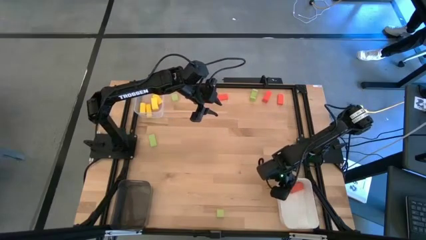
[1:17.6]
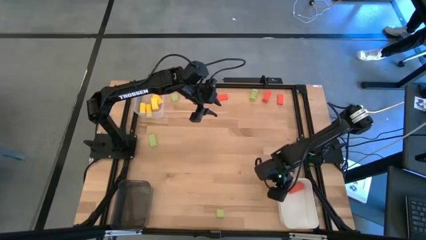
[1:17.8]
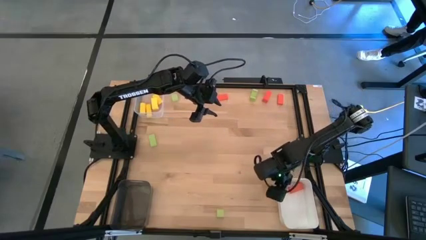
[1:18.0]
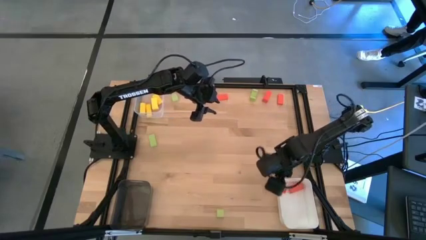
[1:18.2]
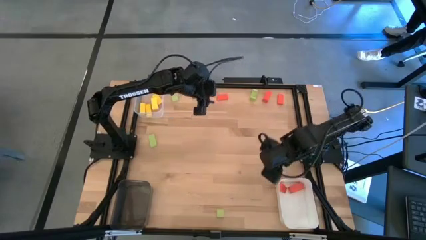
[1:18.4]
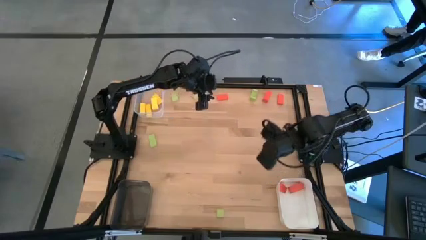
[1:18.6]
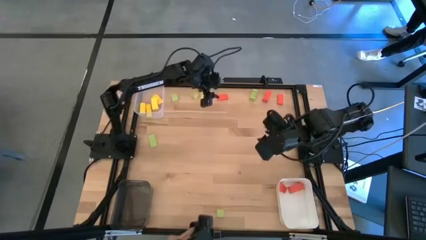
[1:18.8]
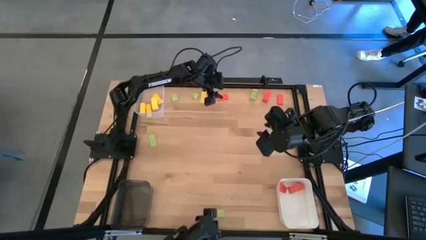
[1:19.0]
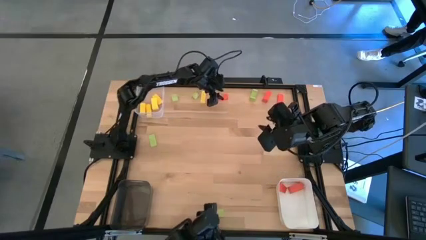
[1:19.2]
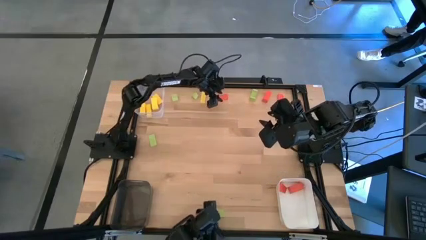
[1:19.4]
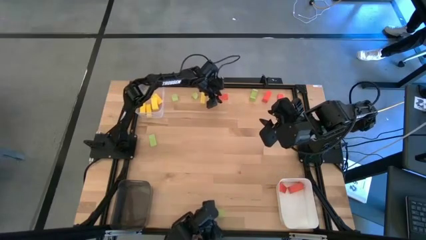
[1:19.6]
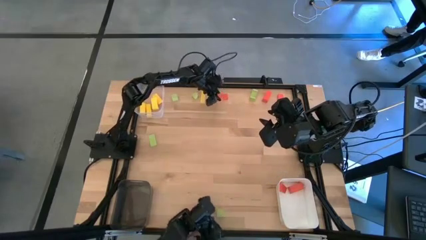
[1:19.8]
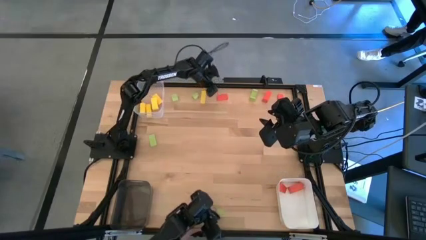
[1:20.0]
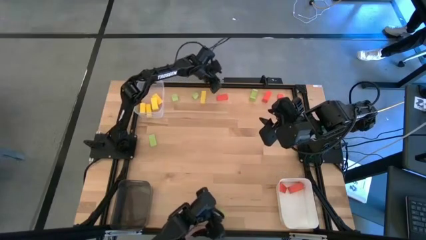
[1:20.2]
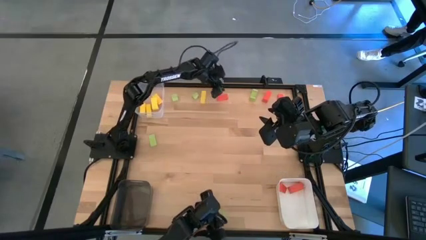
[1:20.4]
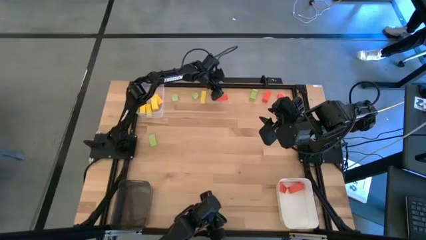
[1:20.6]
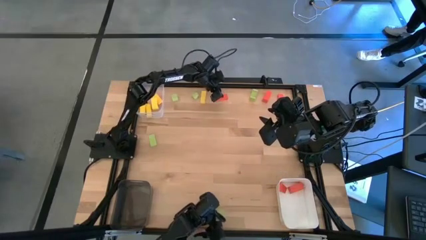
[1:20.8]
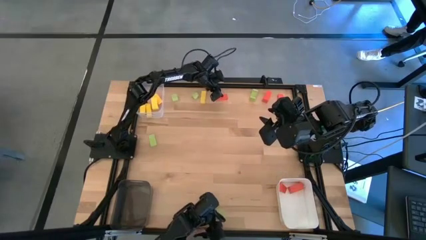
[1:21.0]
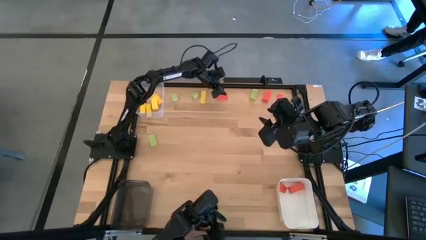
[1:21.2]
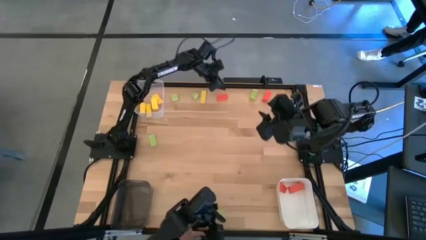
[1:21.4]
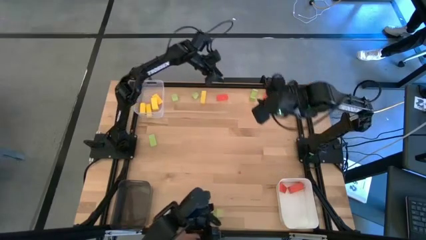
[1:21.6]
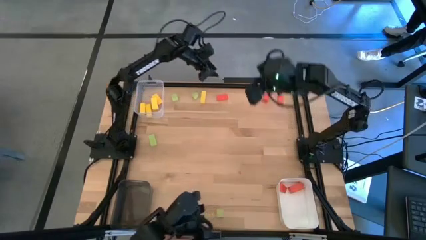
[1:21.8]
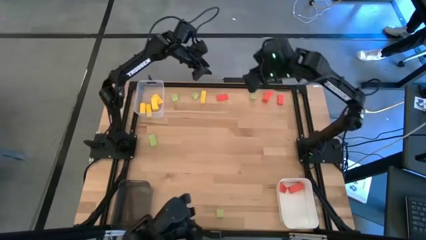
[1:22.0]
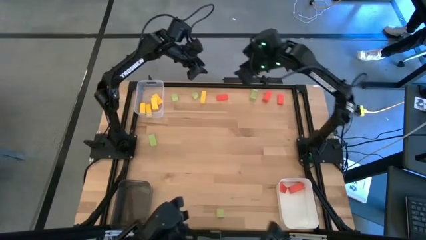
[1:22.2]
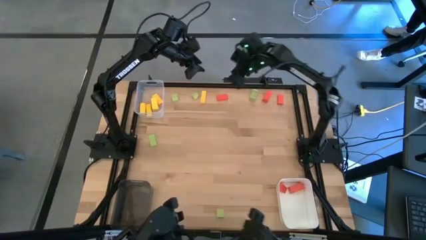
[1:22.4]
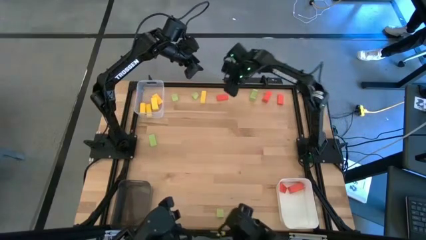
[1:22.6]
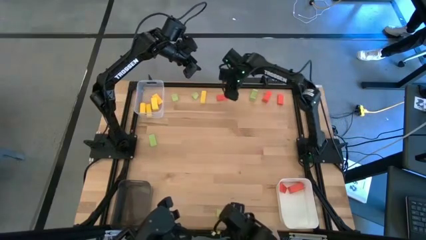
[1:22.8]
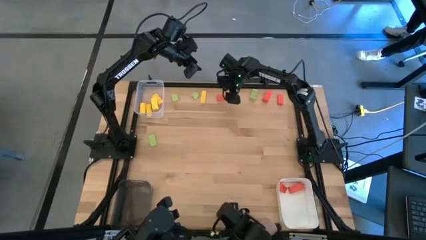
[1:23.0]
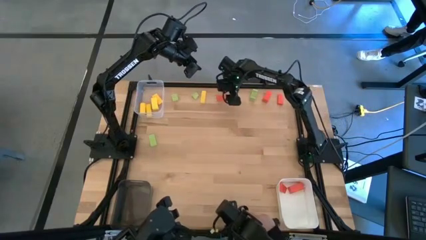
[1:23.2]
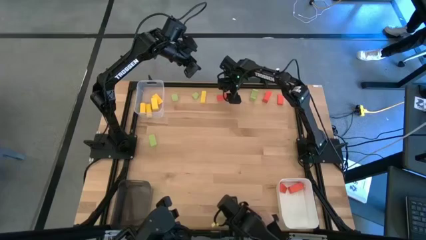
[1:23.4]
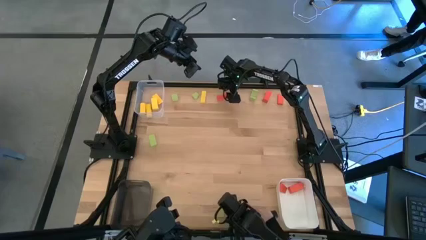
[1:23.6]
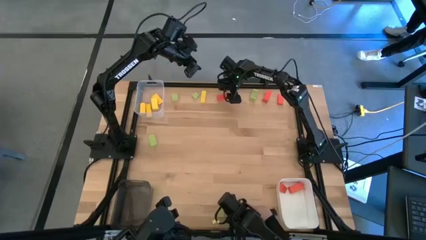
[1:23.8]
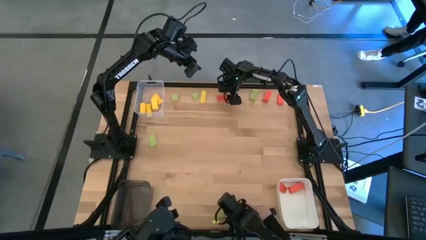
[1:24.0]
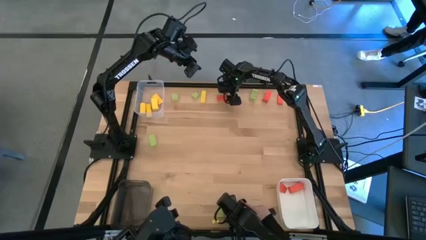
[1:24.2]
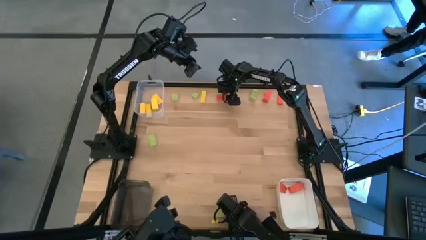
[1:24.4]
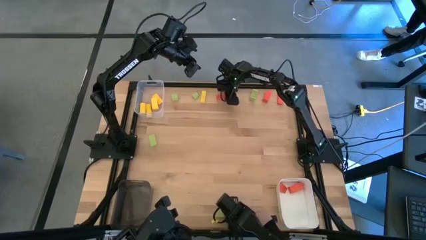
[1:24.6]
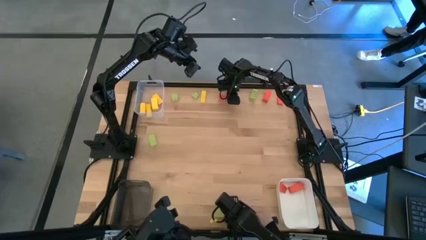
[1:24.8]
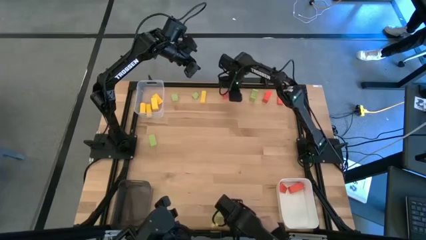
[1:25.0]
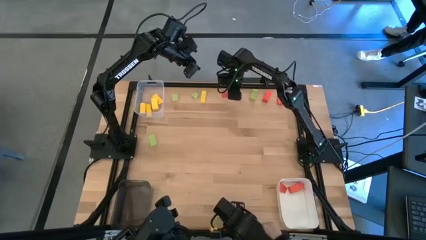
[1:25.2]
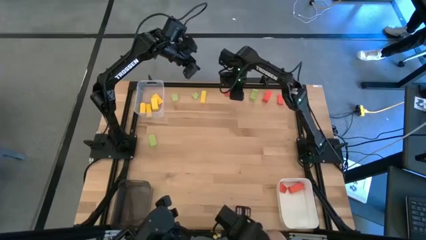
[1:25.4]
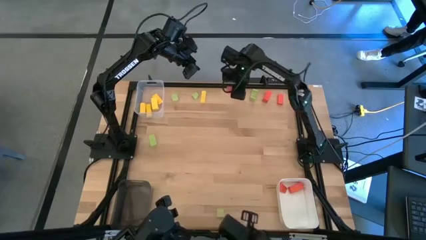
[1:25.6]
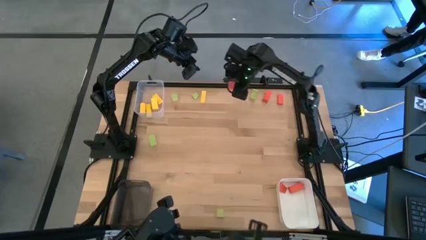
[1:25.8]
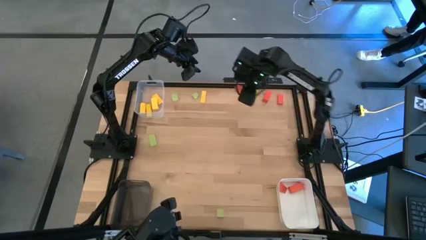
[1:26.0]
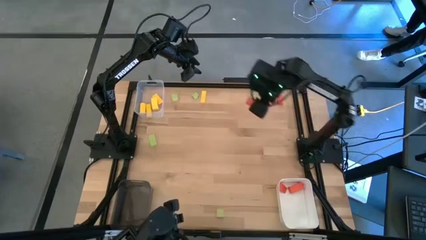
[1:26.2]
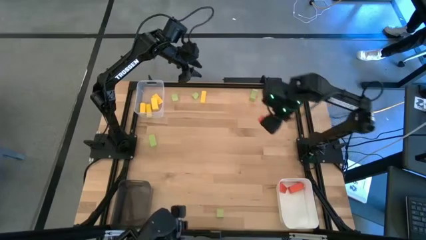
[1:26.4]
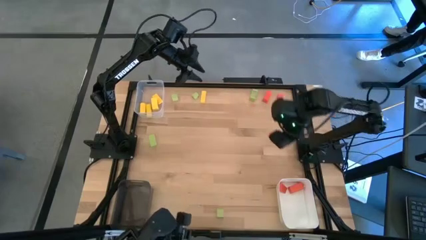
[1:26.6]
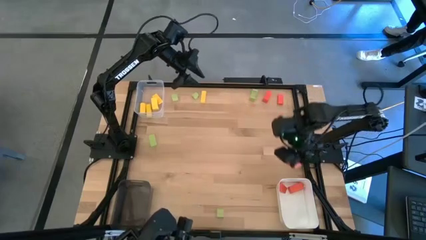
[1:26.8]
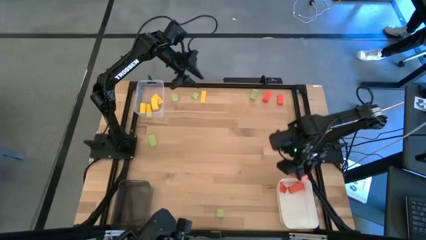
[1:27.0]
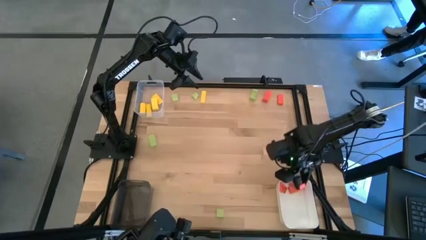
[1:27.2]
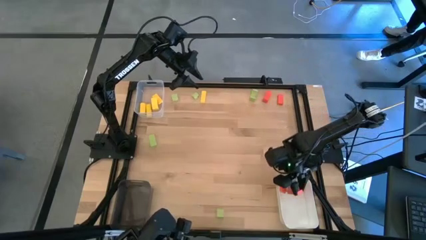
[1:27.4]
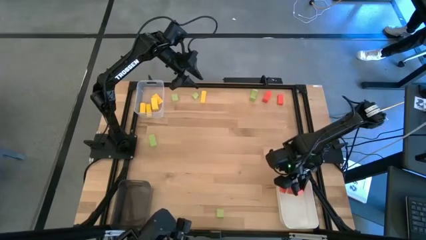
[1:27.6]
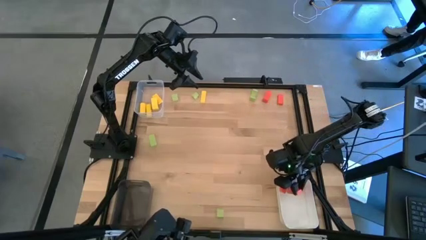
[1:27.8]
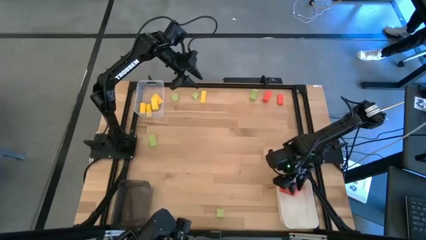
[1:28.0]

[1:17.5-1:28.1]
Task: Sort & place blocks by color
Put the orange block into the white bin

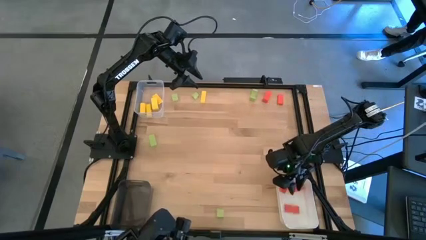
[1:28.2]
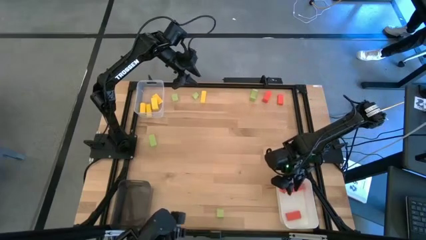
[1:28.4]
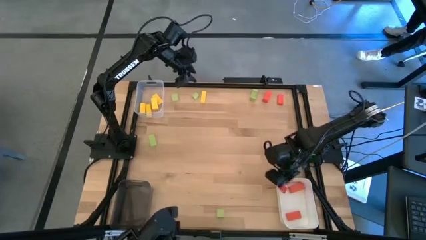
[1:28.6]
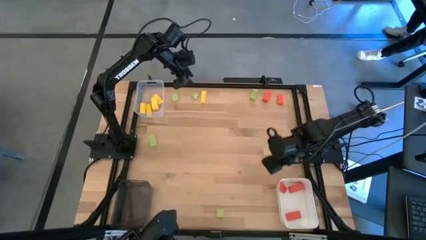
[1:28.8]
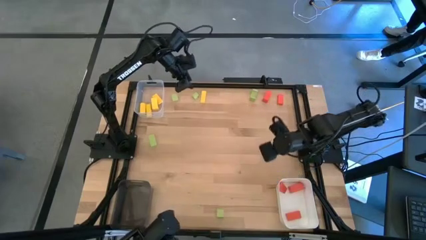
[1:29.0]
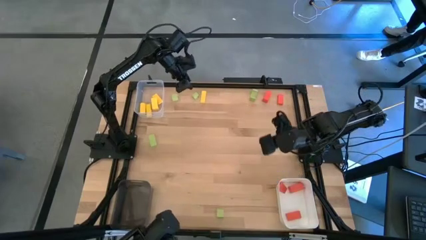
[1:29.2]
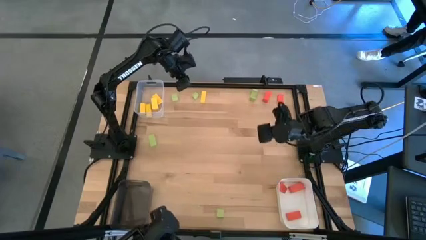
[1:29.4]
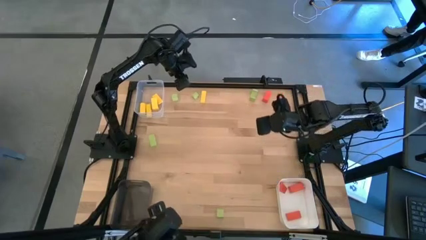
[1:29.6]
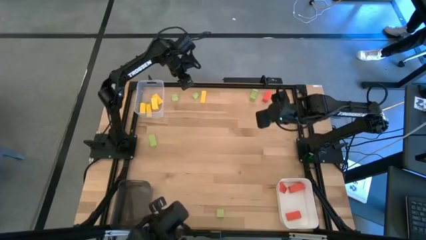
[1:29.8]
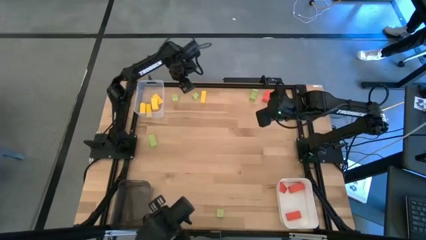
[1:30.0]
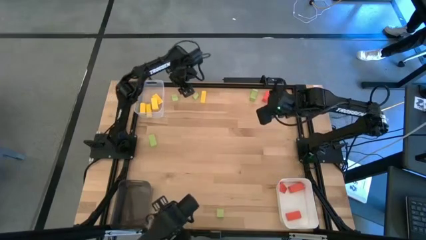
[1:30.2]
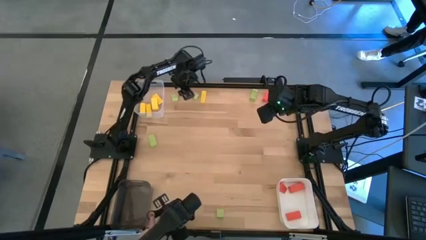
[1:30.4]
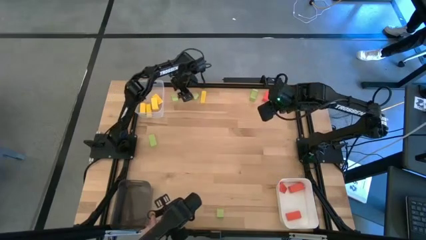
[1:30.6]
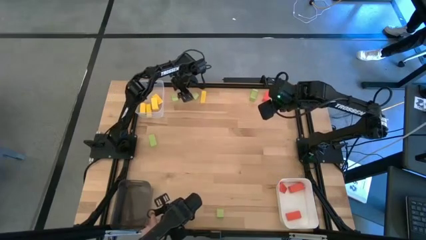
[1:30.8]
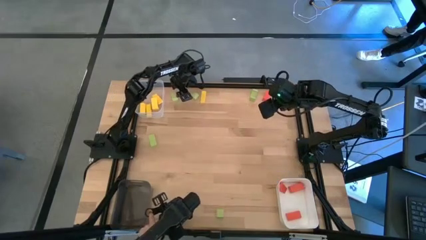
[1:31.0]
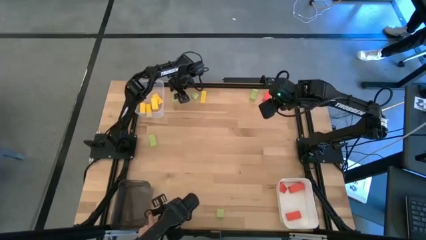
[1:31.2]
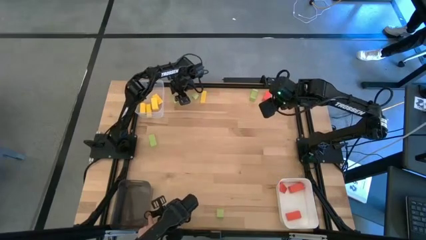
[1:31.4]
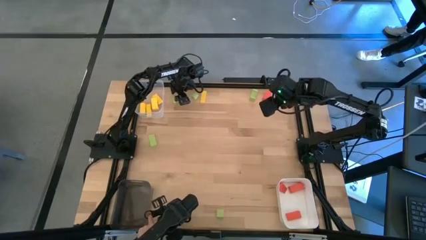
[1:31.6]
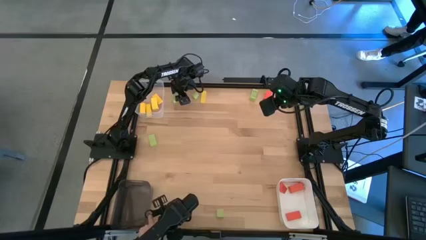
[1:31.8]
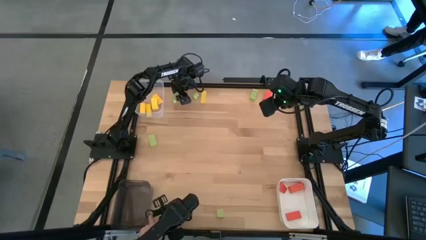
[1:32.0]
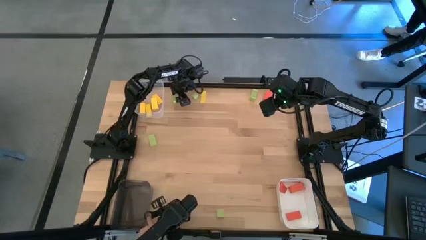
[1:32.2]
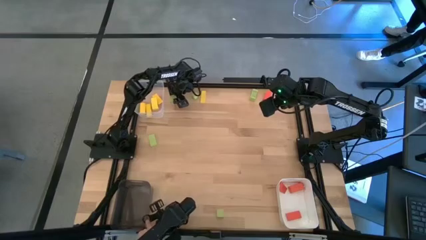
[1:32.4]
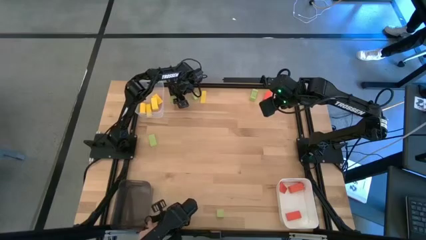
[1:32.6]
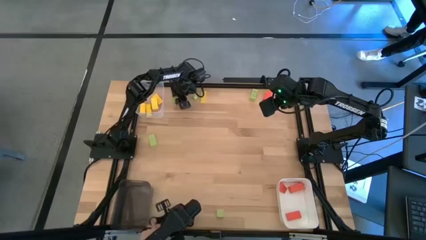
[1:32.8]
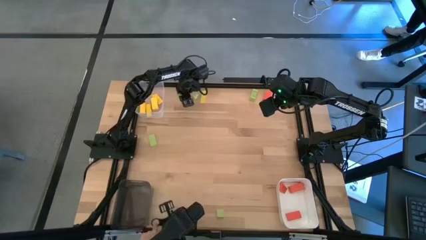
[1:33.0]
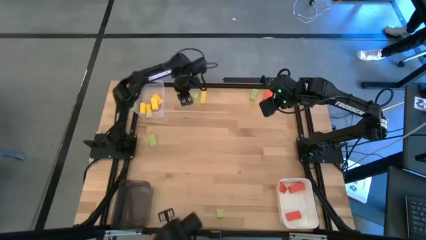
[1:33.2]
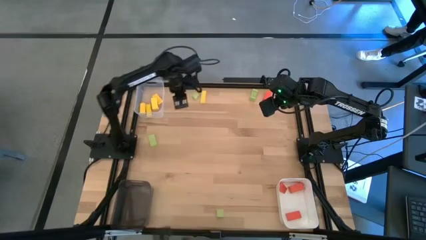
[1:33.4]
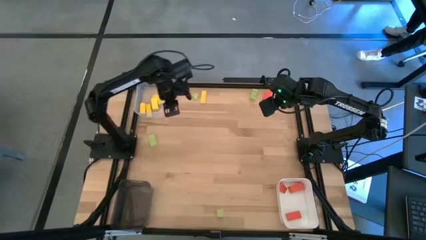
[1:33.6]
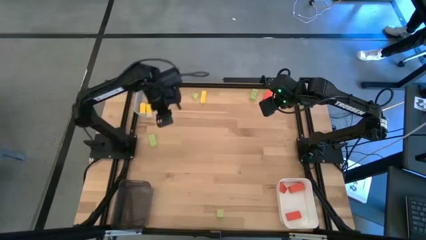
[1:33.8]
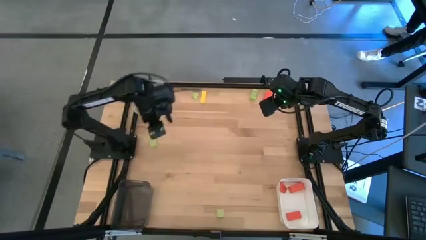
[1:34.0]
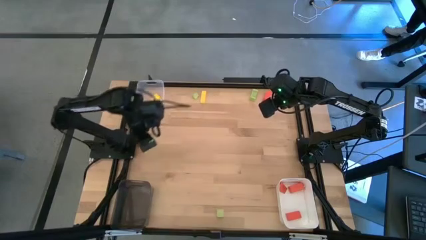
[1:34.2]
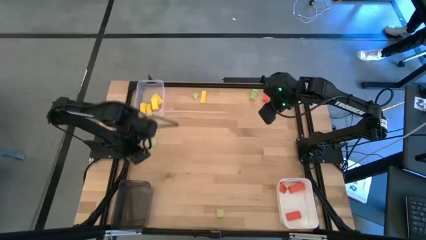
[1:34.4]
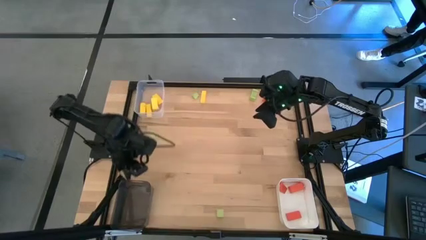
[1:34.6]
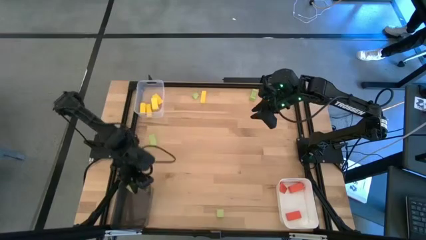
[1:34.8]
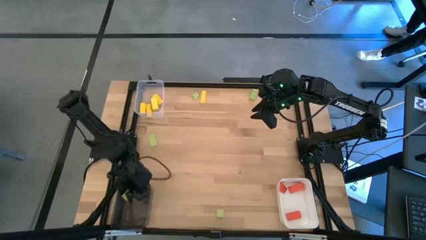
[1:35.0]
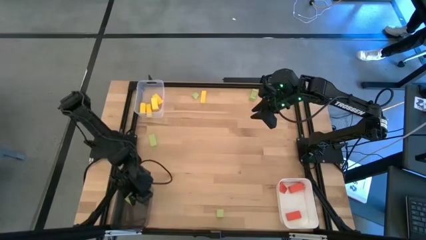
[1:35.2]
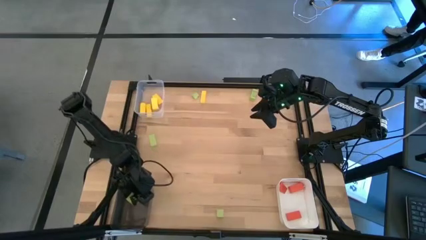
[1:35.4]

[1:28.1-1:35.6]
Put the green block into the black bin
